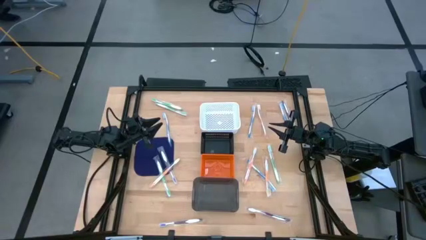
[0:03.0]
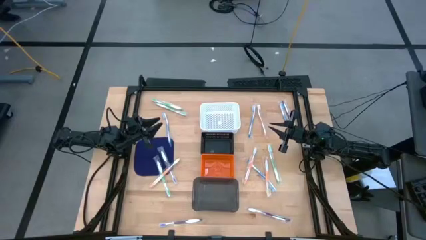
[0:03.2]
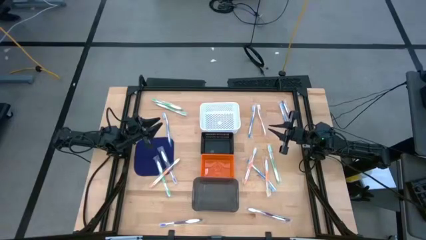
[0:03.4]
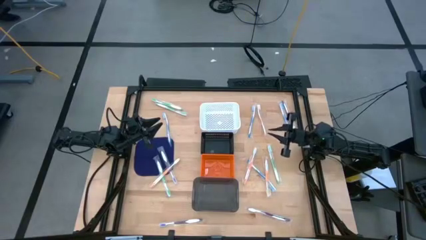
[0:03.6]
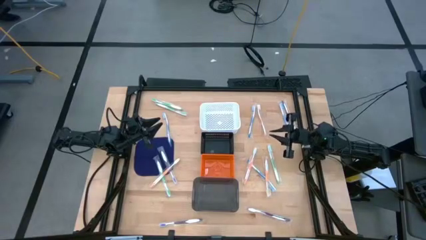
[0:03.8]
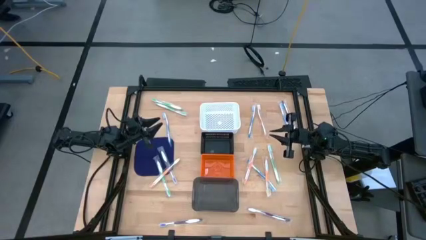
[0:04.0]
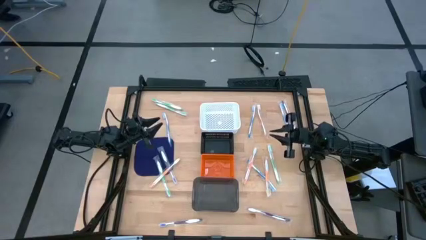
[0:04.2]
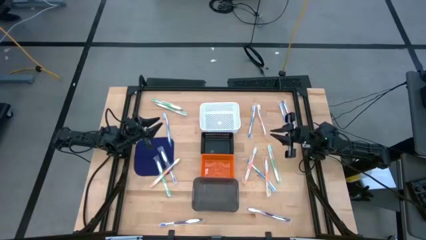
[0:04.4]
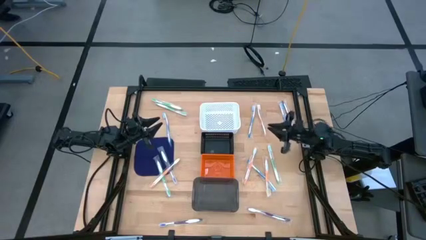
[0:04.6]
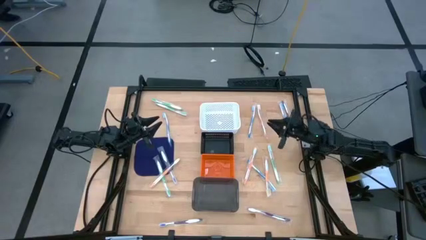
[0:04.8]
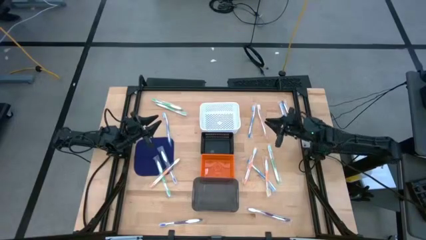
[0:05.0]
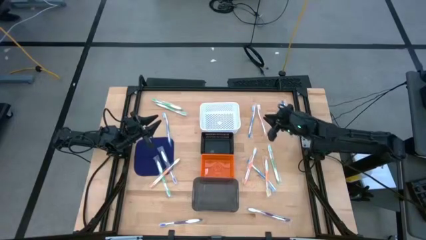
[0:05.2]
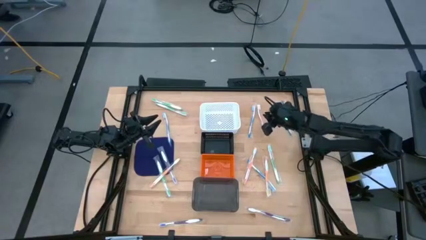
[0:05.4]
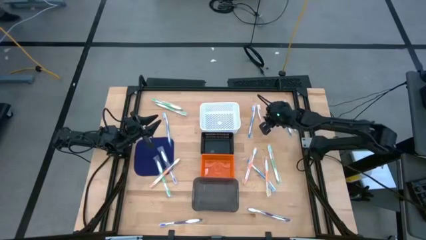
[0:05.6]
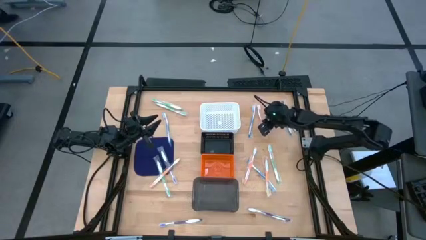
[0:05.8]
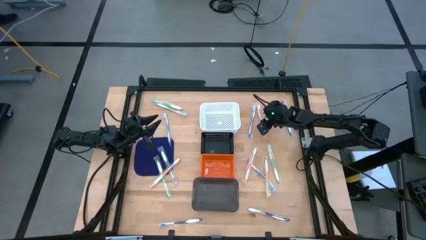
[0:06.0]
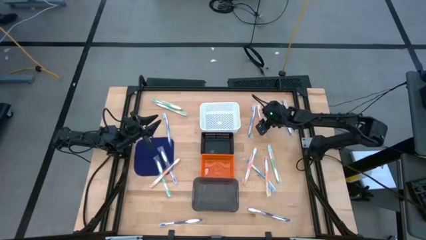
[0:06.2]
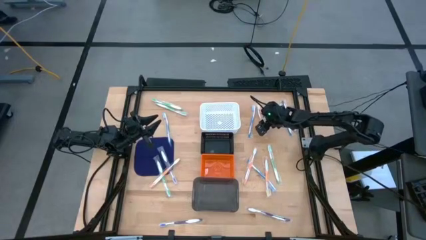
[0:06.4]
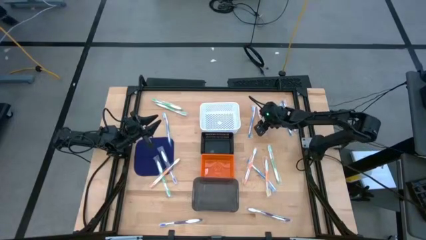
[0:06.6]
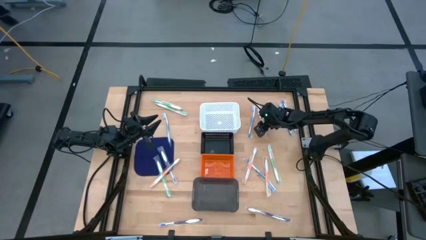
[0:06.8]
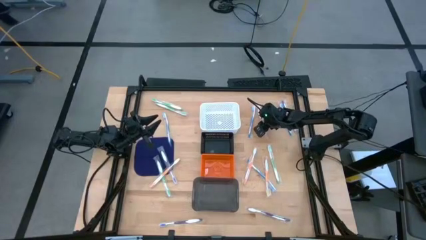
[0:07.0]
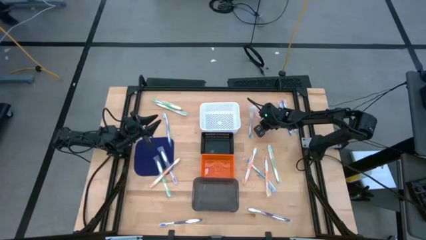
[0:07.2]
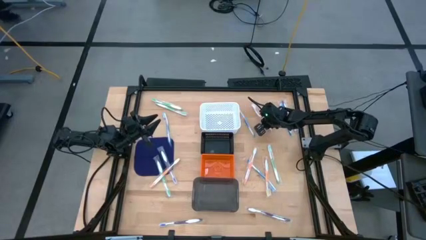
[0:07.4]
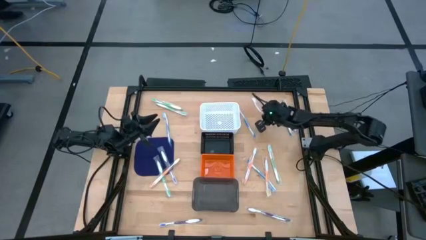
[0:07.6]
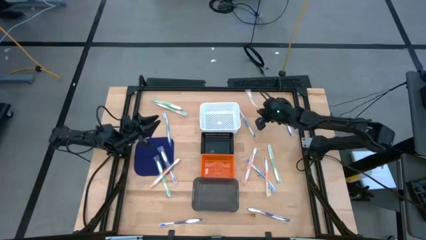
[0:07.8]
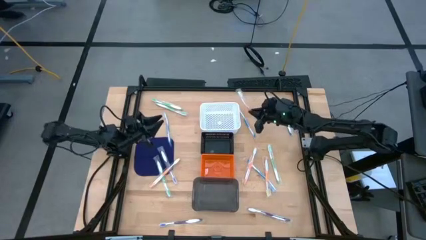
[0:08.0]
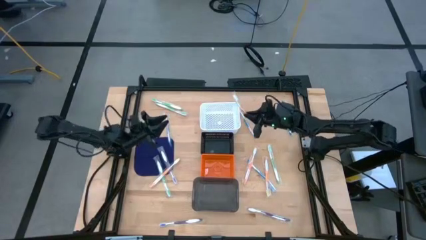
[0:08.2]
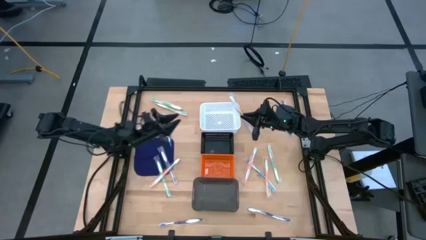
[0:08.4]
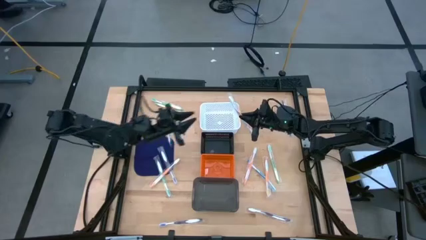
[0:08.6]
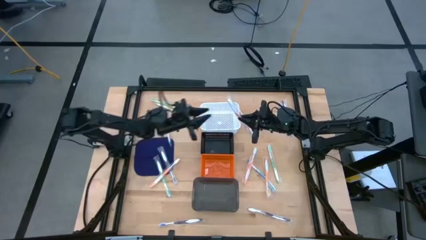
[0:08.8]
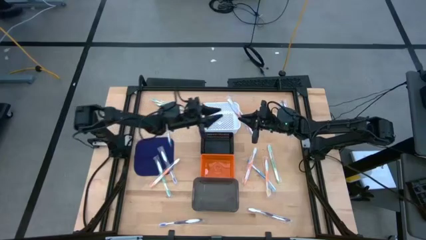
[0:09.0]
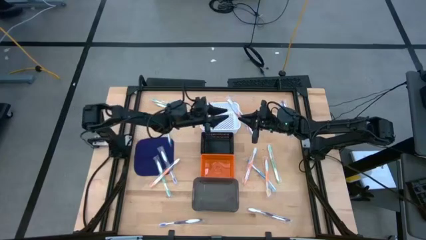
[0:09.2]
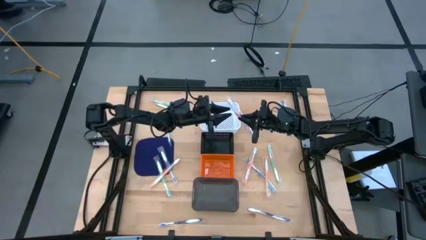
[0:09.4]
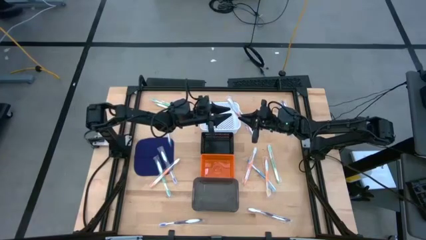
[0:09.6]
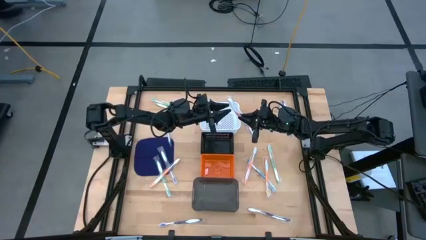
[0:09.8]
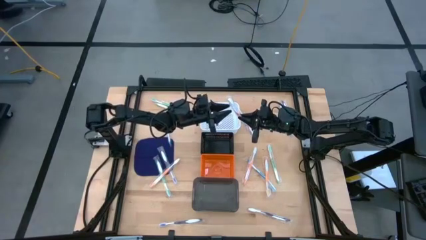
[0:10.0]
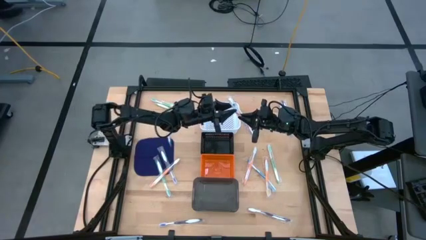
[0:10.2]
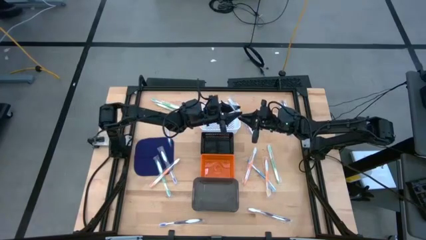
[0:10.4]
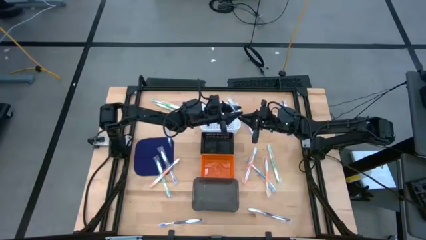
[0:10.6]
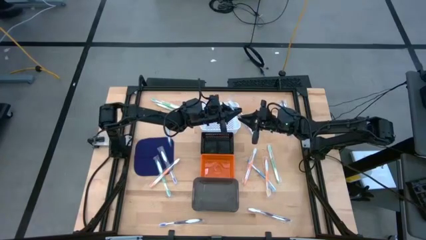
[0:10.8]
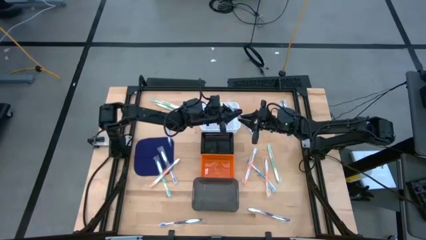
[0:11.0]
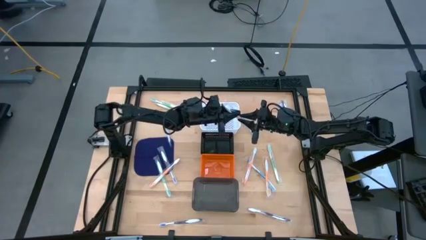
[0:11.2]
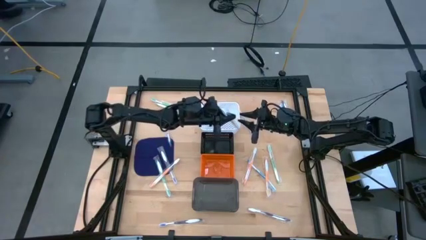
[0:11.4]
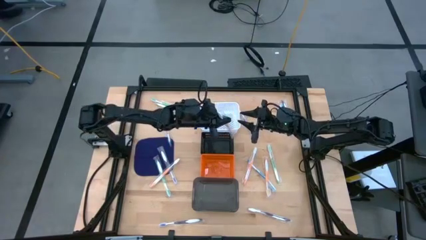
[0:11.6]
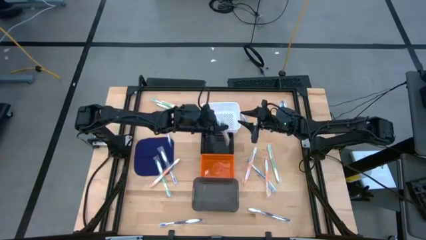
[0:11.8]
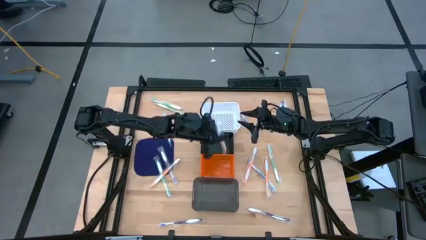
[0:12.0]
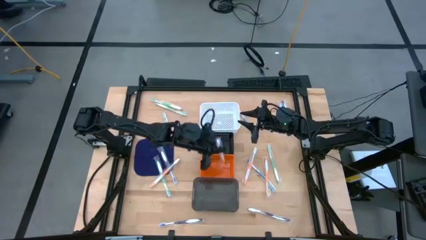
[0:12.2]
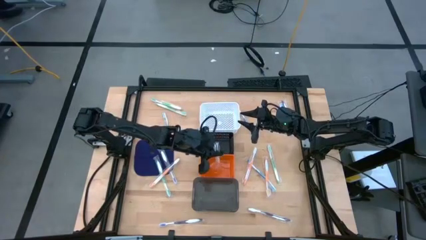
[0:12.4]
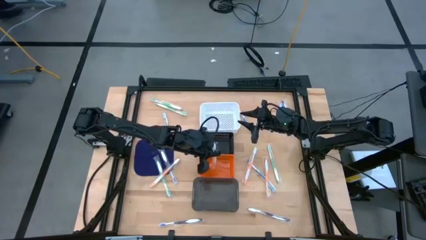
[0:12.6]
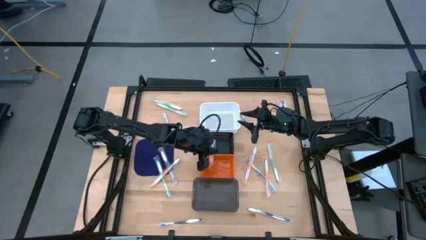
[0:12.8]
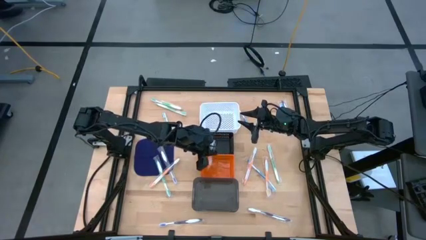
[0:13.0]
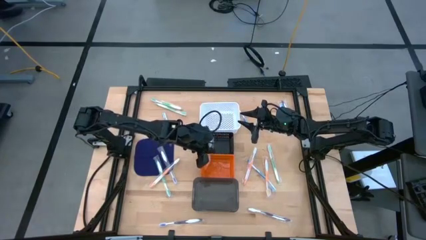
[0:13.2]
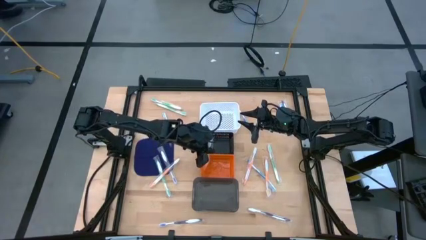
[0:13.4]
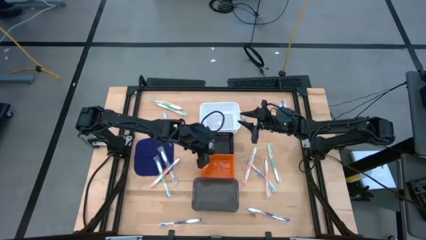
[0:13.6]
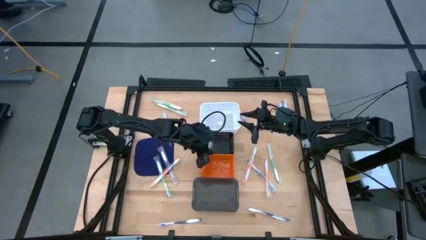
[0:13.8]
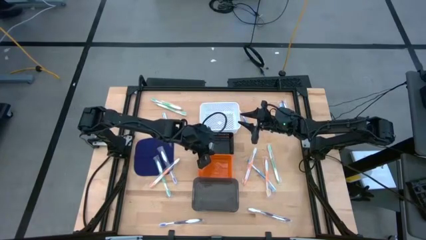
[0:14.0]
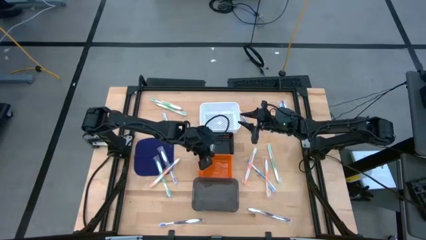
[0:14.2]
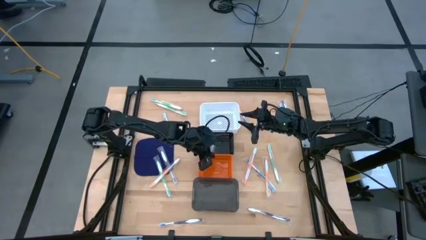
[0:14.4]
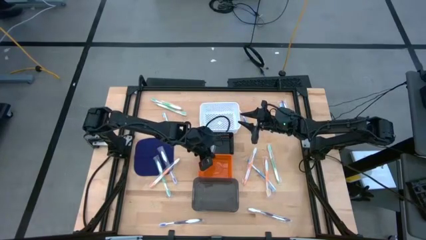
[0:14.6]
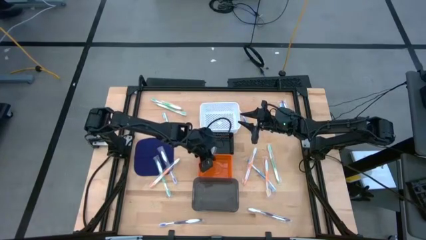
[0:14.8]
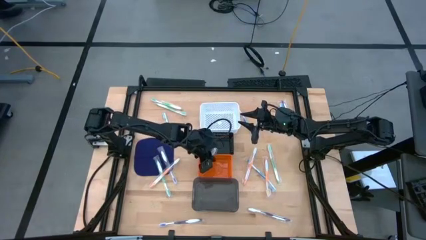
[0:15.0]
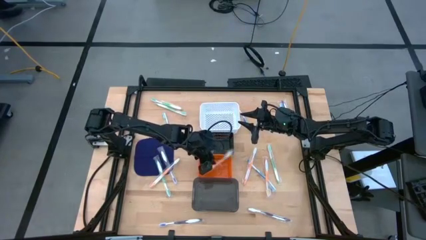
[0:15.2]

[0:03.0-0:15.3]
Task: Pick & Place Toothbrushes
Put the top orange toothbrush into the orange bin
